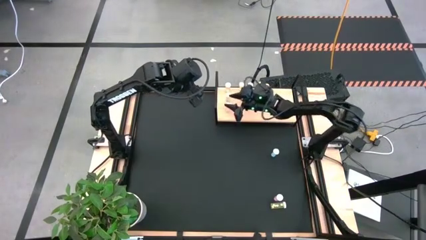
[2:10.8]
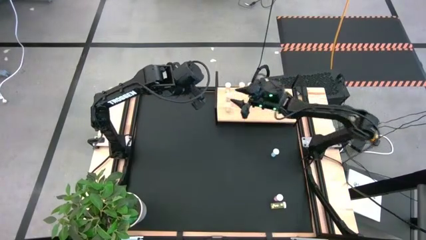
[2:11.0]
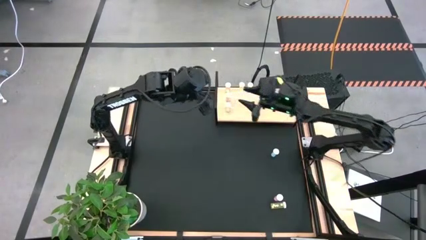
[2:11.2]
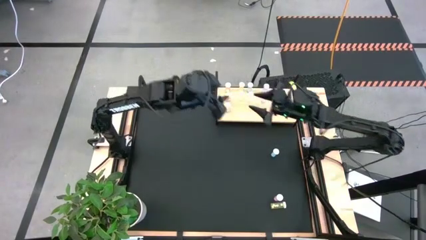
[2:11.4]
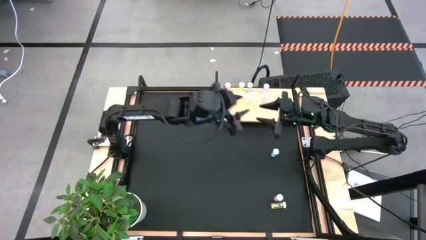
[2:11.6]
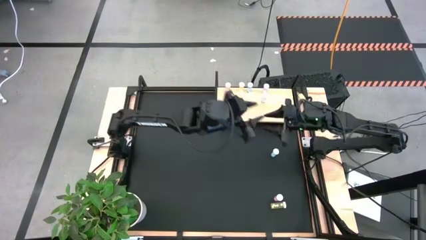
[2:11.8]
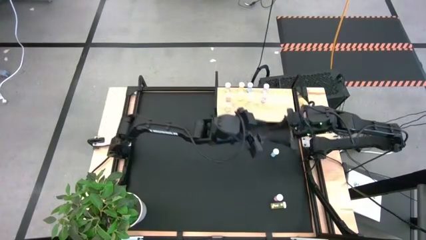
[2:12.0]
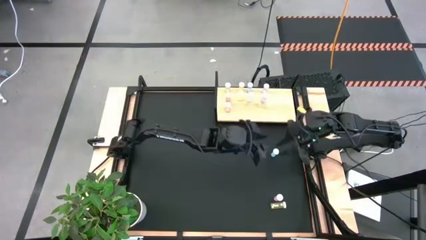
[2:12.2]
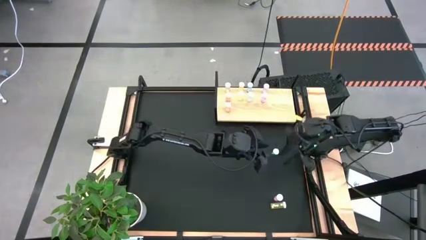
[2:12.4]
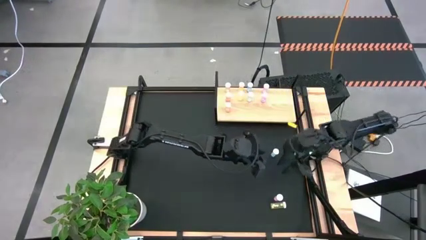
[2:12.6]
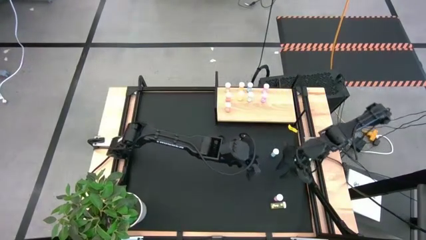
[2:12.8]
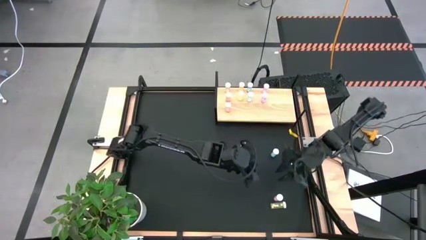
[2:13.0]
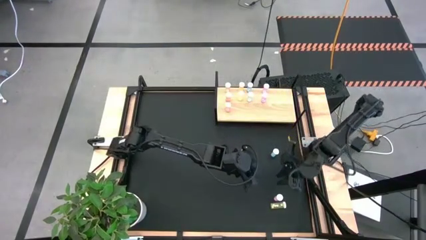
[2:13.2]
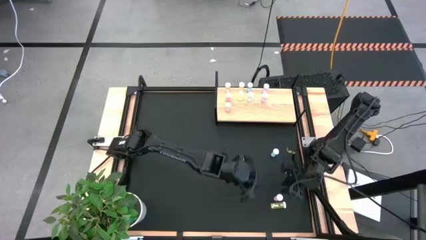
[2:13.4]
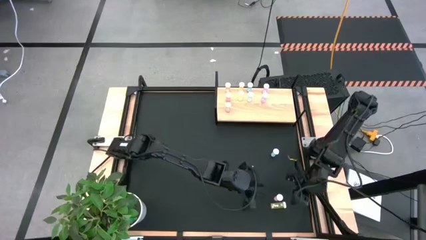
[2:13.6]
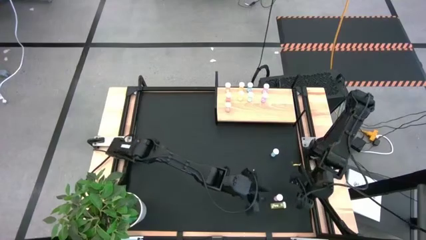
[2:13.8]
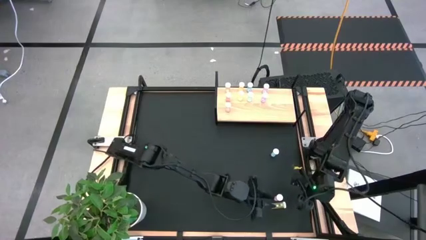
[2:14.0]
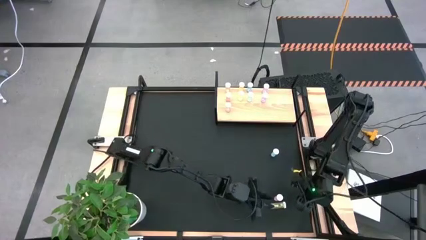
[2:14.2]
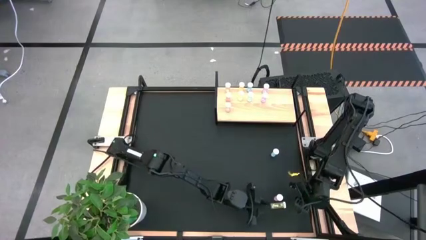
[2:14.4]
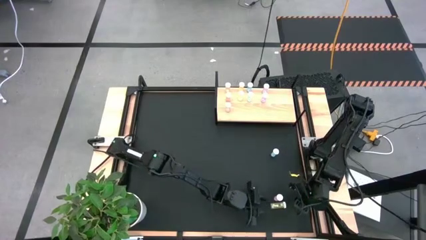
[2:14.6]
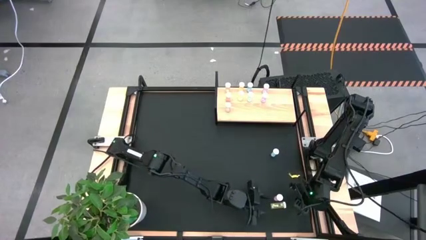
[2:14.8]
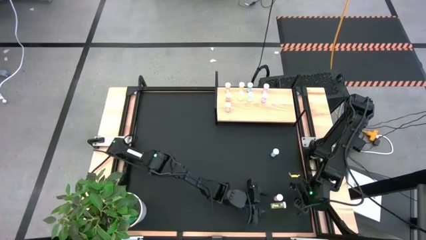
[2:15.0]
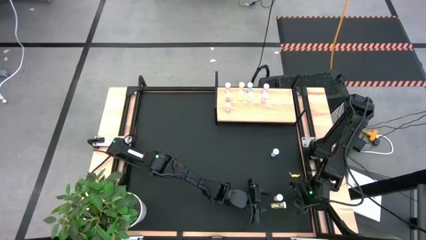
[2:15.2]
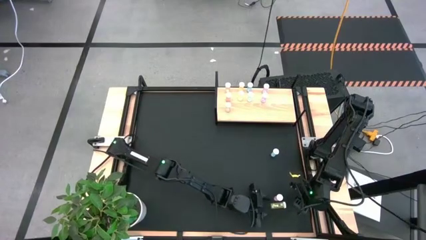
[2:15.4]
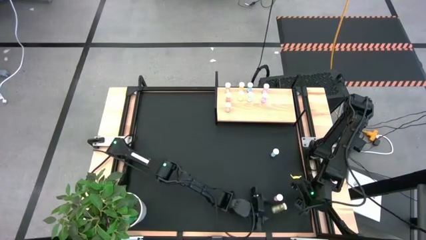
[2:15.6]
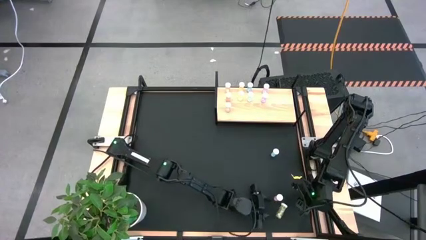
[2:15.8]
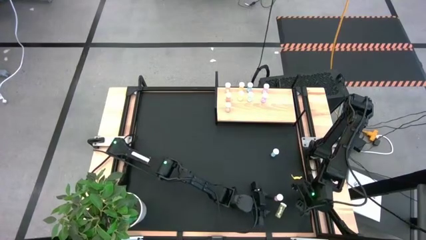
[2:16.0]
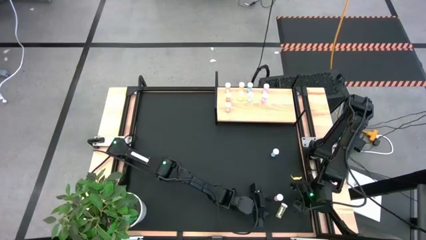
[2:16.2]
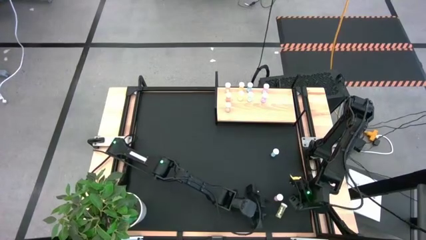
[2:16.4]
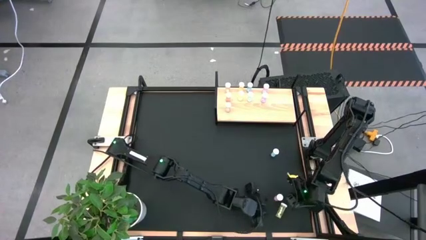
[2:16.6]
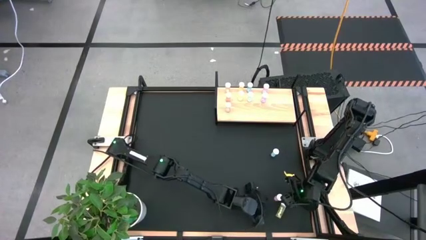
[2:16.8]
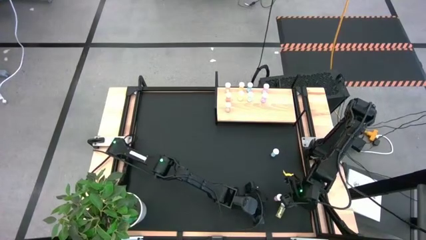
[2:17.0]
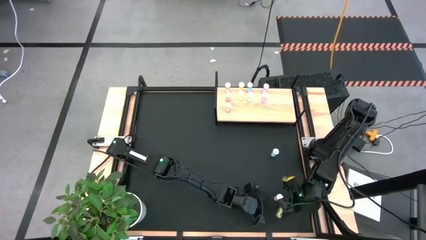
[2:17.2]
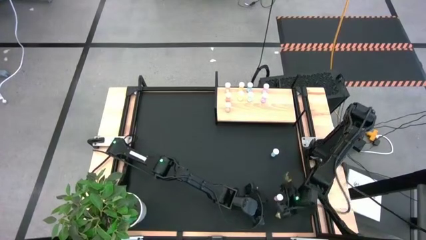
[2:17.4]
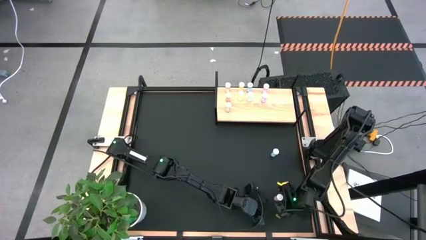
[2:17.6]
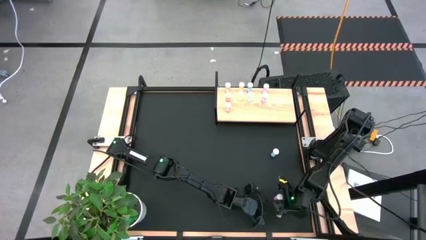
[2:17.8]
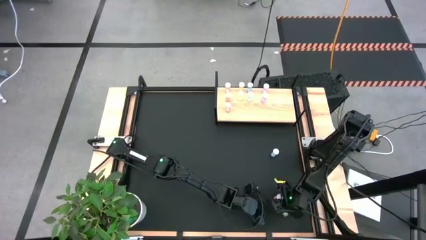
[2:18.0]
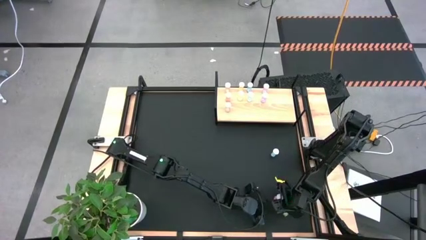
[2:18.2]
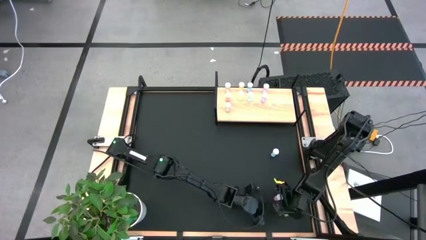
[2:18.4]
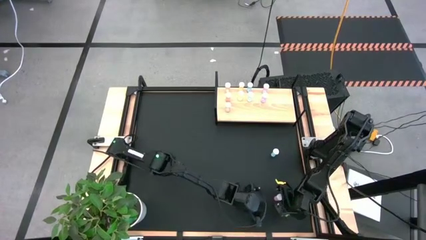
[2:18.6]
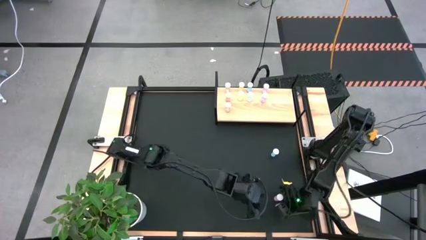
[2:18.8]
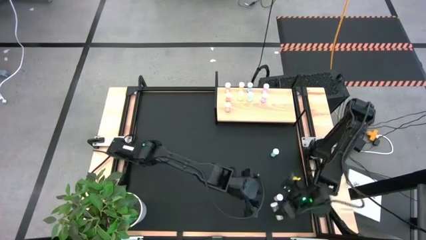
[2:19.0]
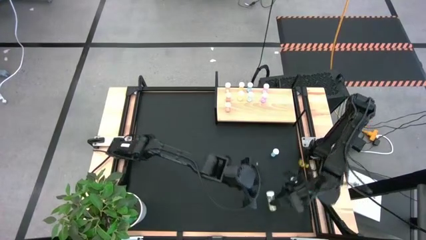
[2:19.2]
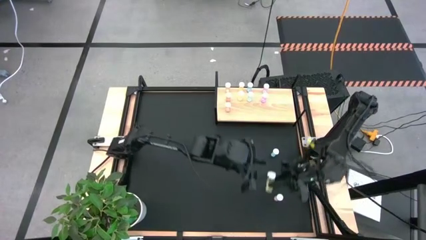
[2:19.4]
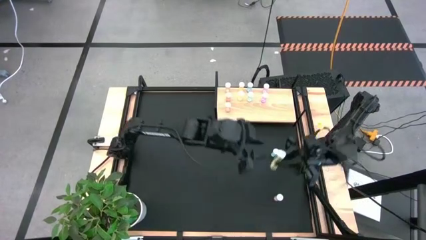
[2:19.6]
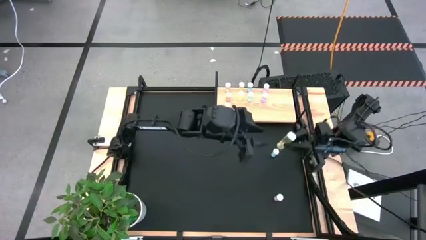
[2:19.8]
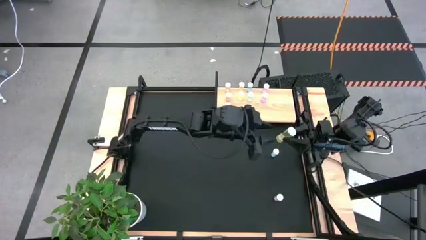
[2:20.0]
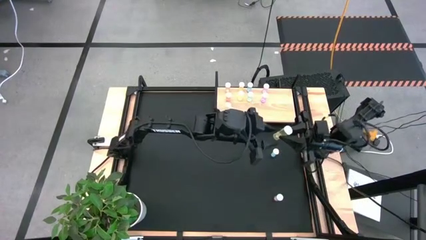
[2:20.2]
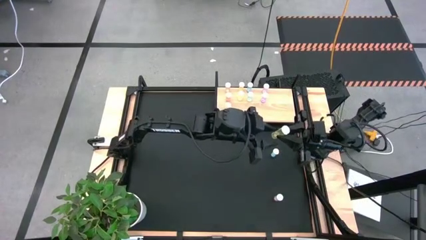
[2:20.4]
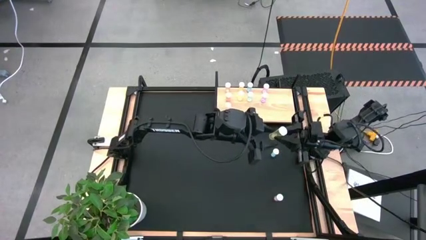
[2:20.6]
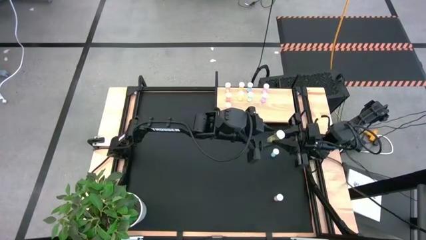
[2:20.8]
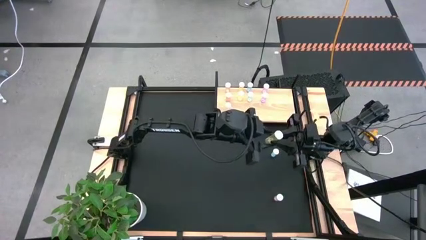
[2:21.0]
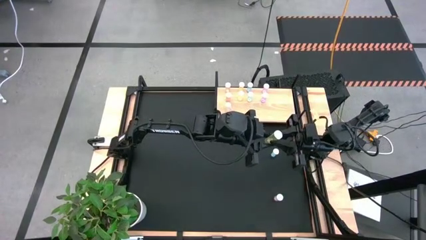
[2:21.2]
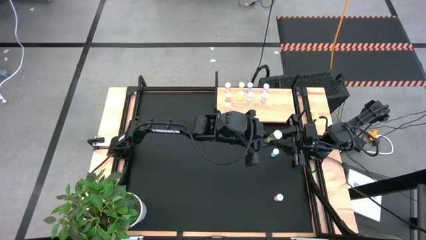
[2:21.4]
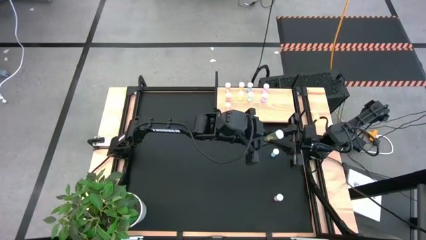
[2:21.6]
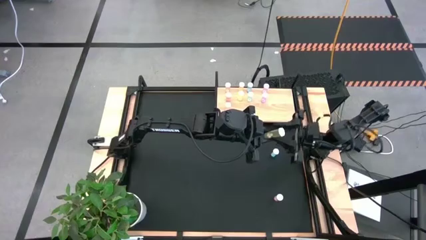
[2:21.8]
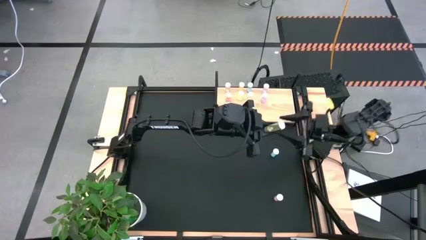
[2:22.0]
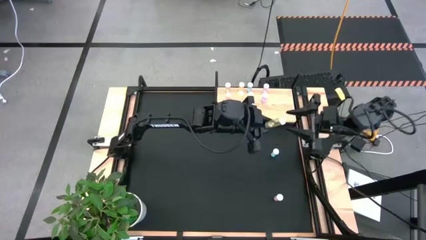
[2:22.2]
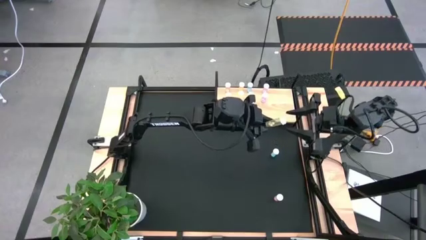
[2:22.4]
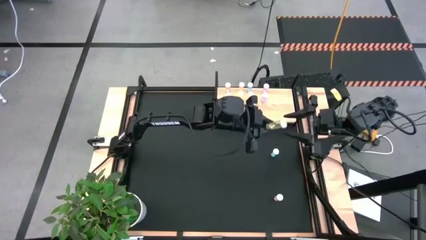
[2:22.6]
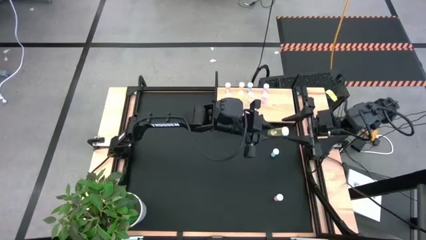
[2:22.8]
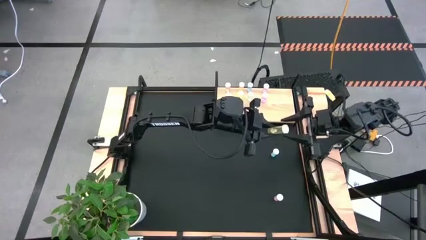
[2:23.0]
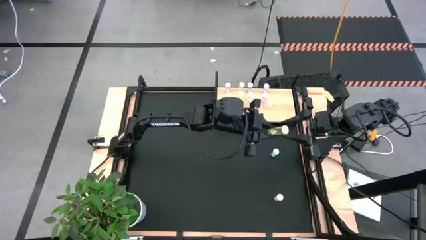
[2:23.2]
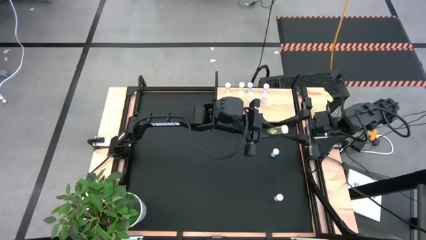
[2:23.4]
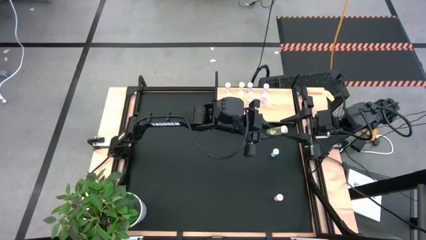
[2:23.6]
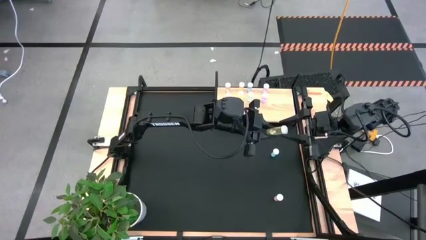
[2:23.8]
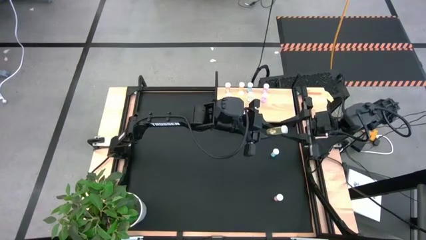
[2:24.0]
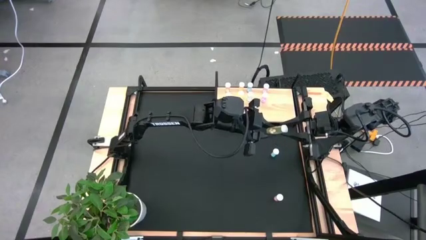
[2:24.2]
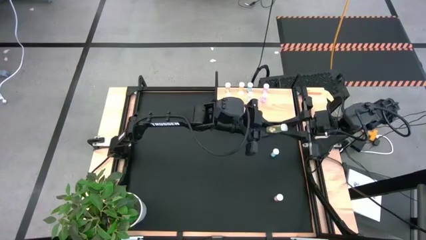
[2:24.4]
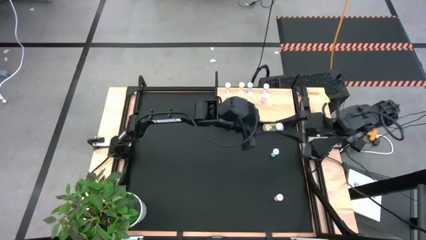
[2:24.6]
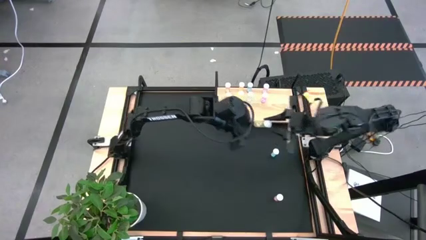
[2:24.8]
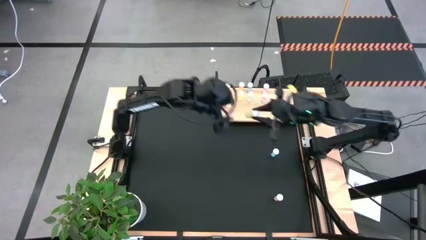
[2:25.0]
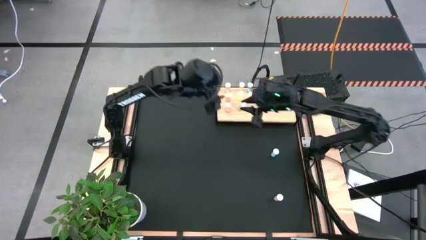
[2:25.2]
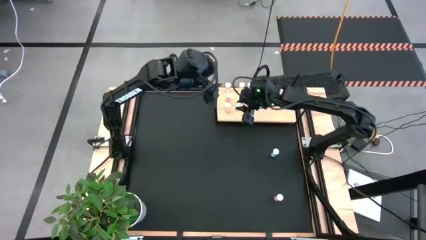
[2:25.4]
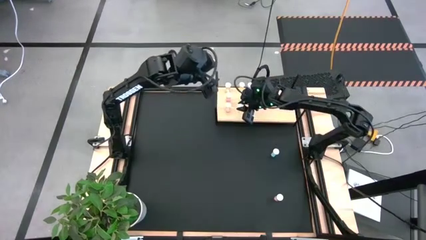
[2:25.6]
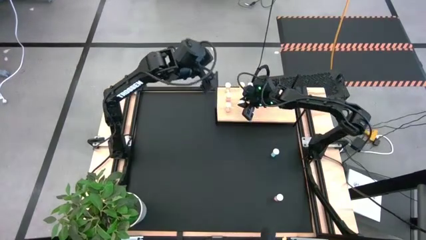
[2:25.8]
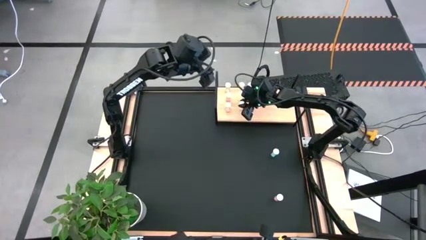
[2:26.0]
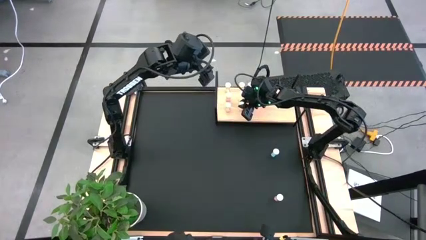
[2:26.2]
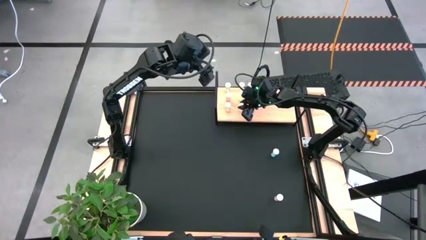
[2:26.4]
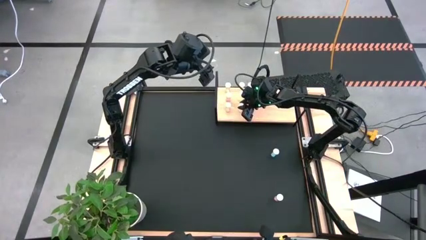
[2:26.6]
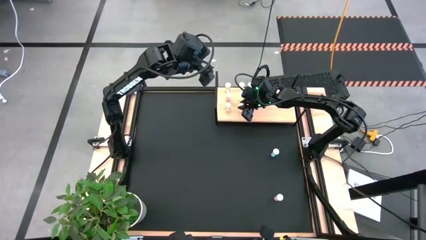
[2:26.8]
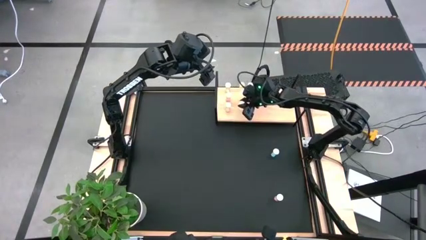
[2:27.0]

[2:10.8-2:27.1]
Task: Pick and place medicine bottles onto shelf by color
Put the yellow pill bottle aligned with the other yellow pill bottles on the shelf
